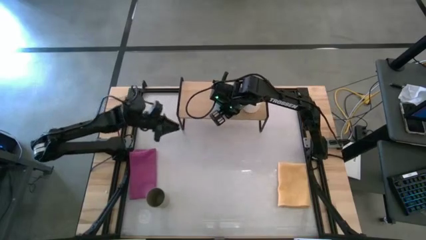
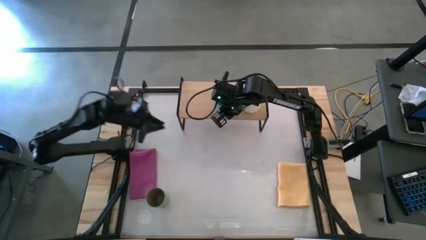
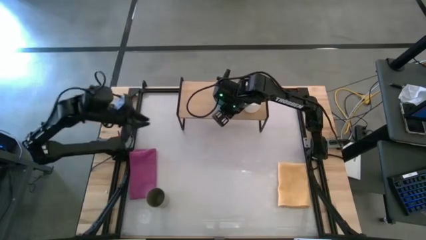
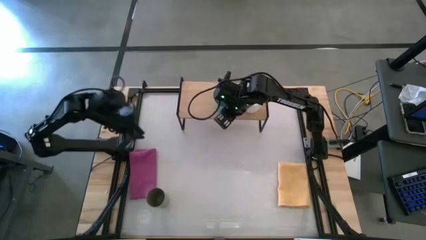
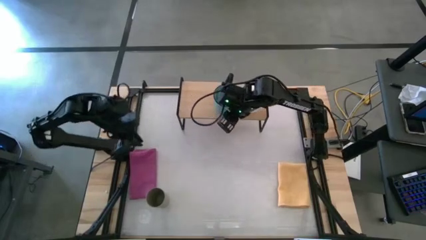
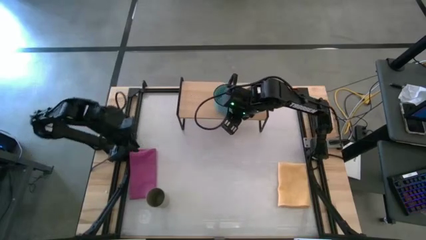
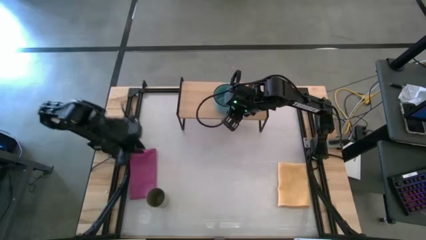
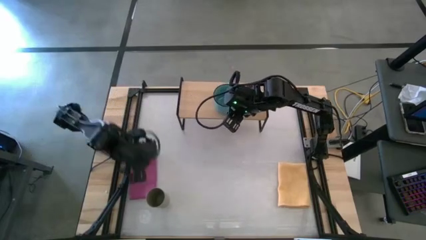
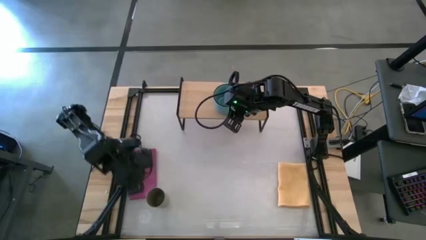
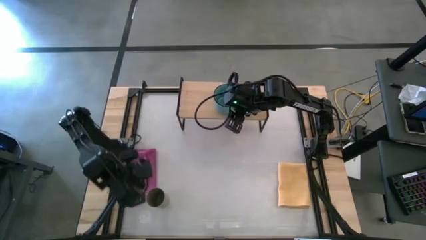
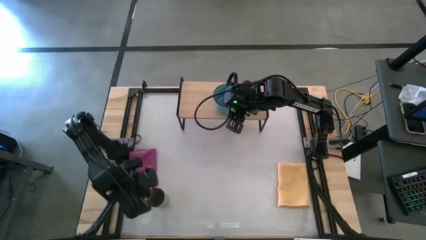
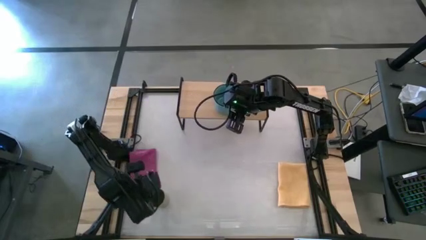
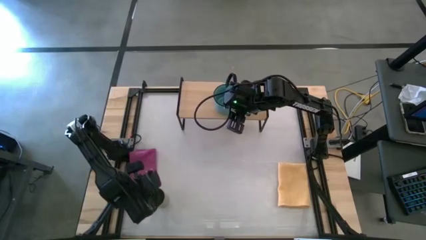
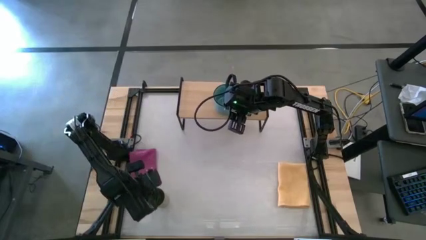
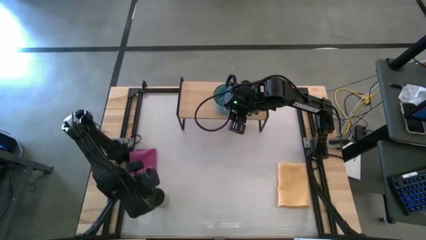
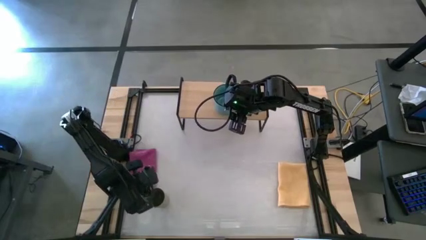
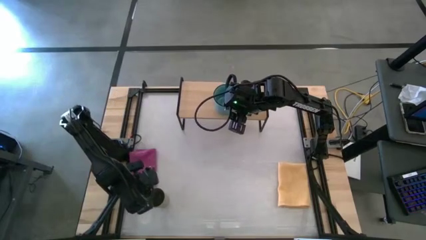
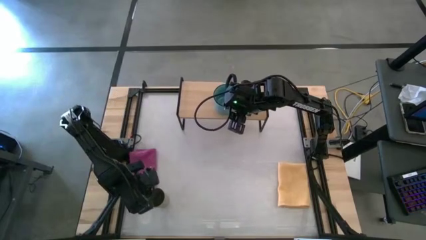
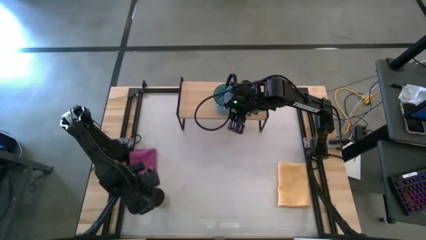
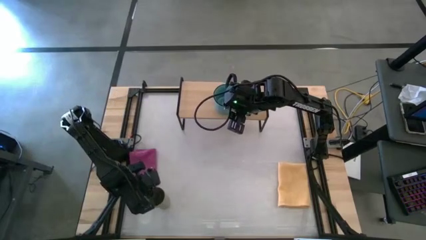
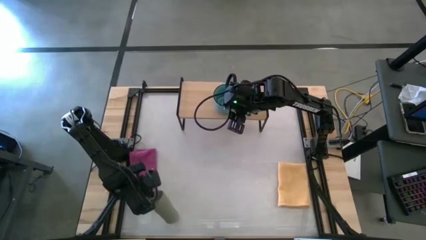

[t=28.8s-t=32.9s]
Task: Stack small to large cups/mugs on shelf
Put the gray cup on the shelf

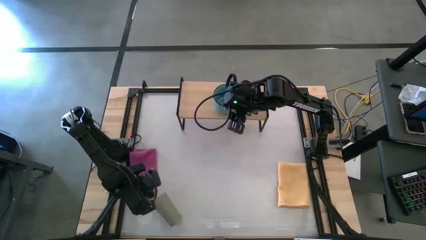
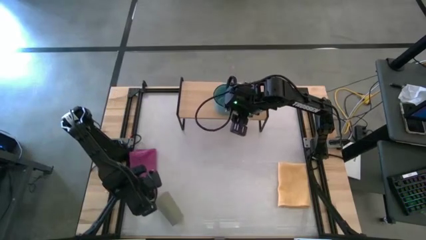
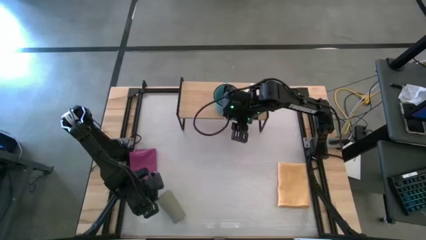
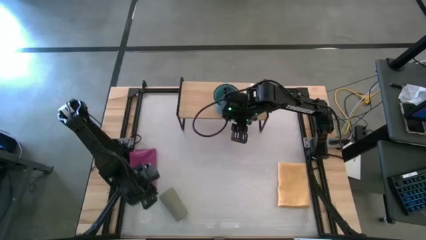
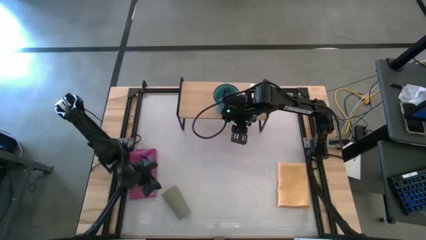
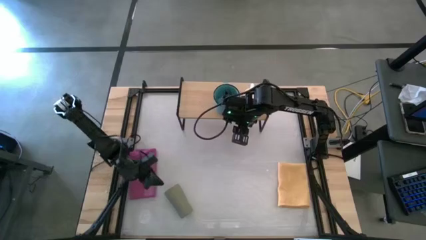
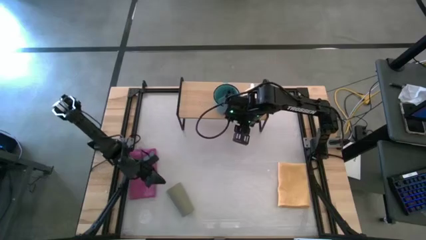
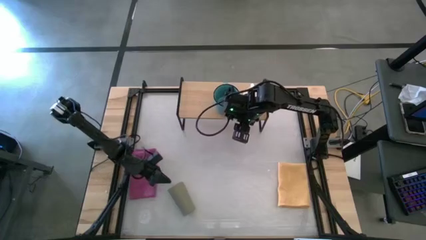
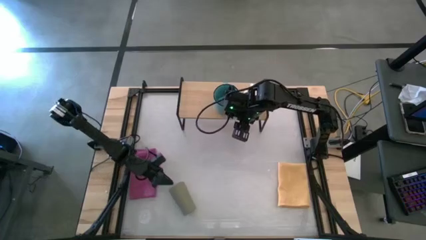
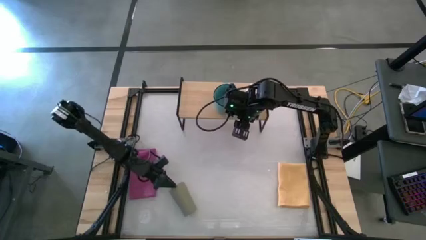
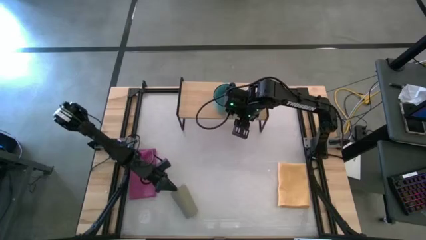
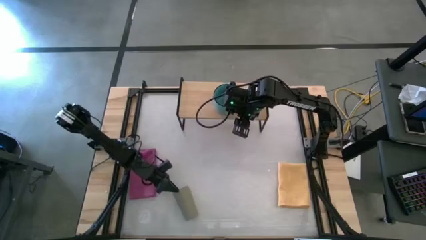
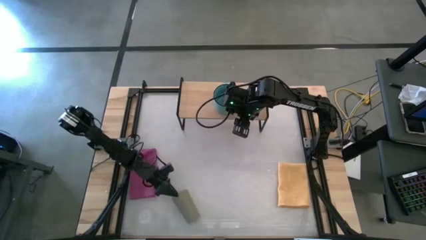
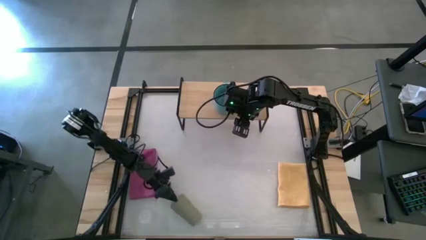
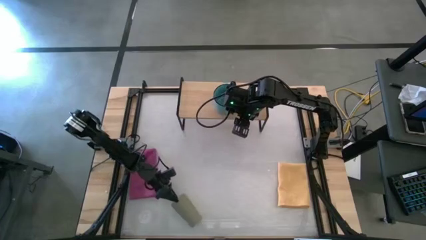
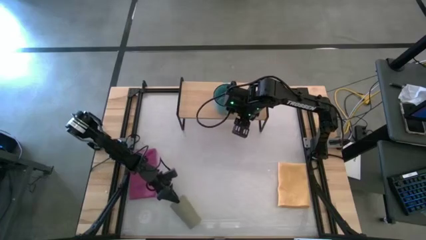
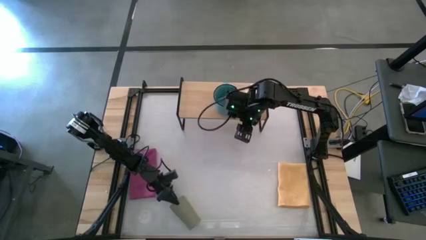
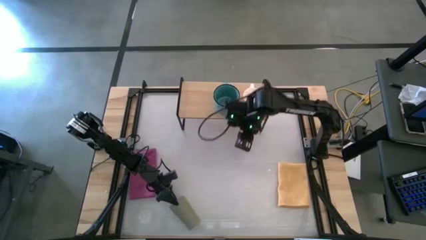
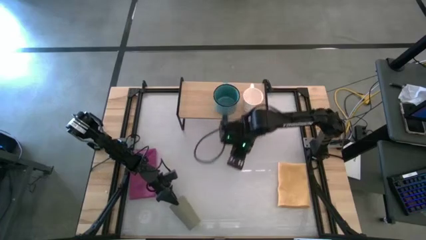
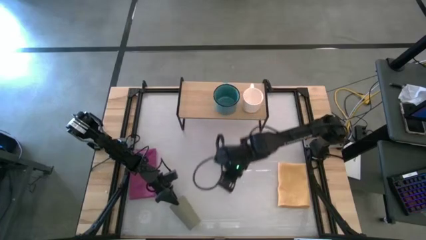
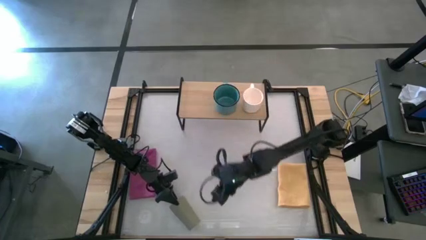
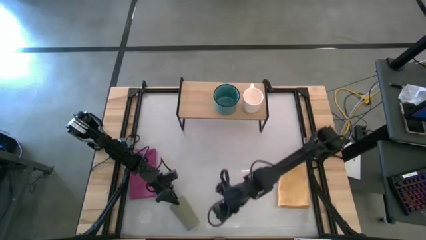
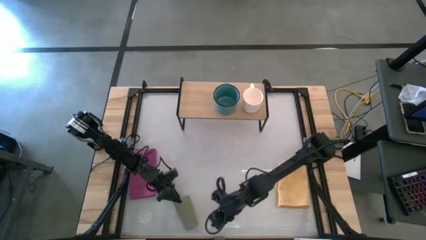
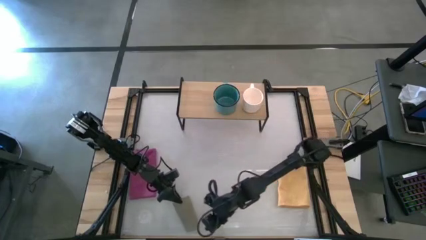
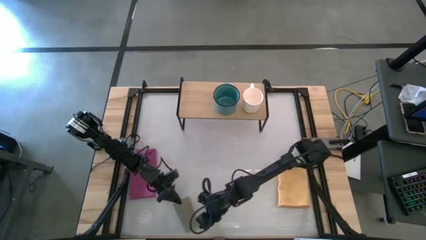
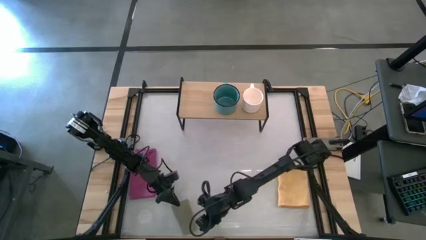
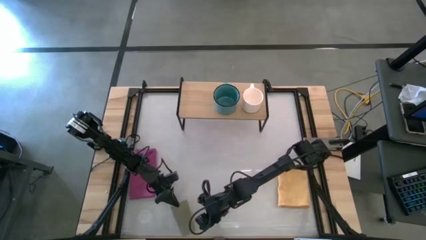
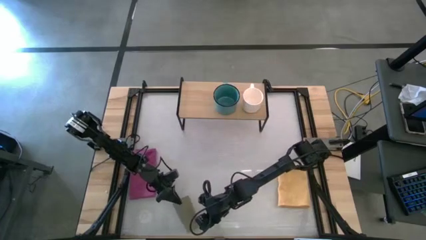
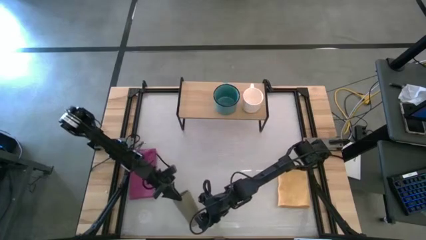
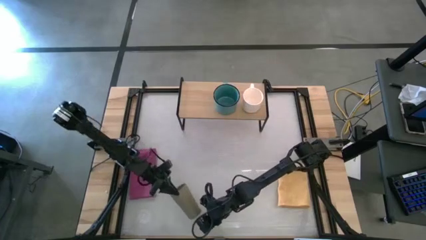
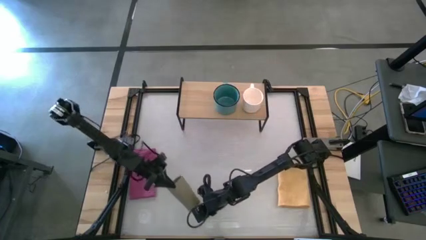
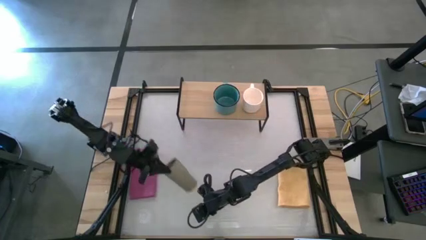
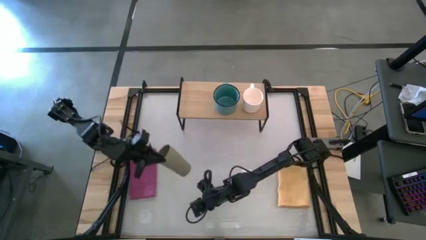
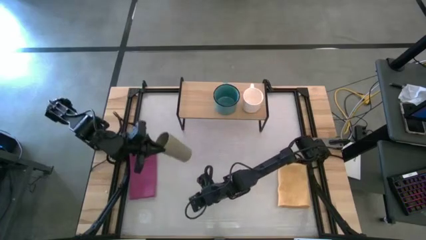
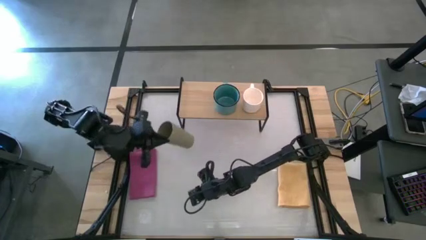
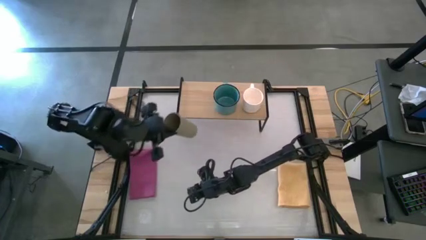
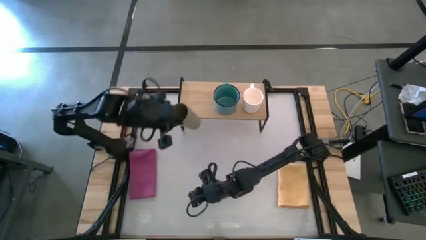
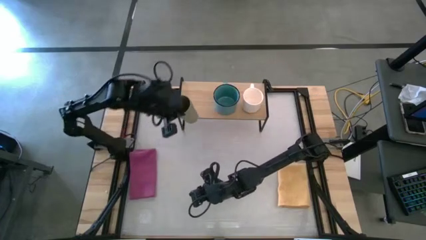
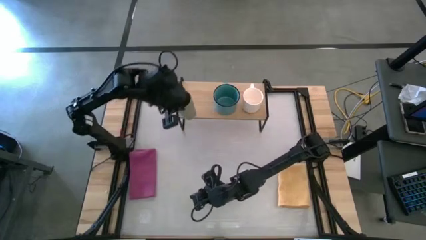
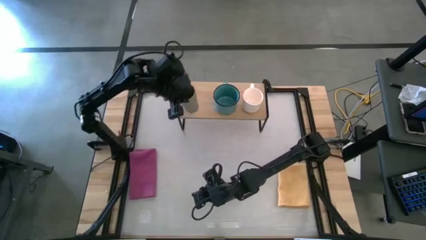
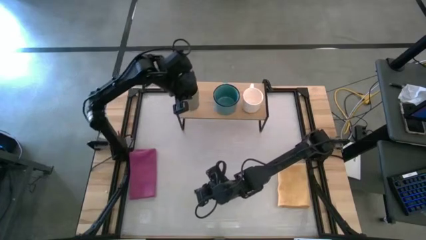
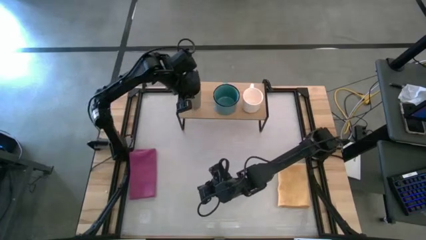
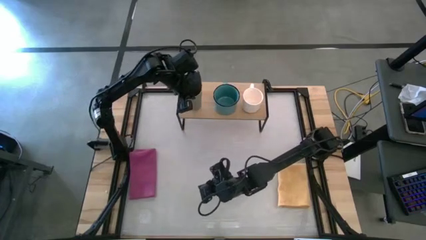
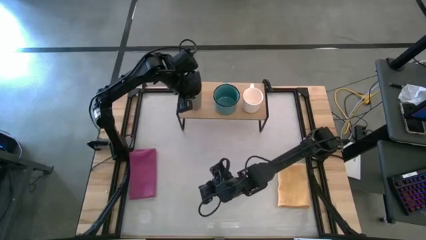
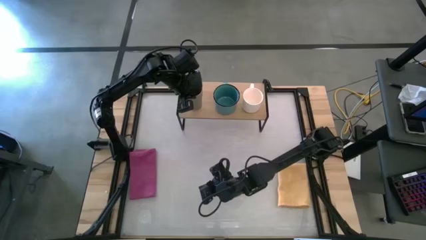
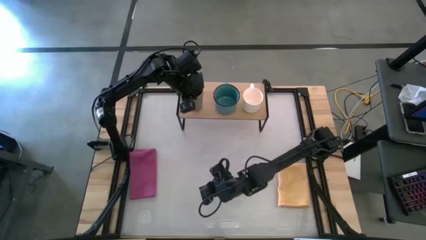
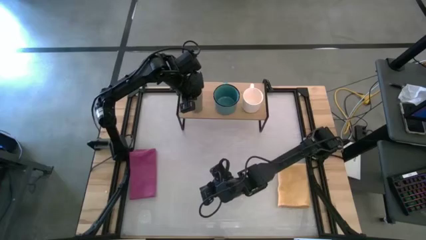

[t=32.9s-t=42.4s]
Put the gray cup on the shelf

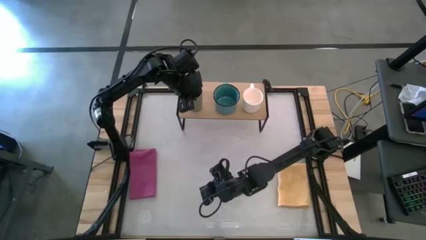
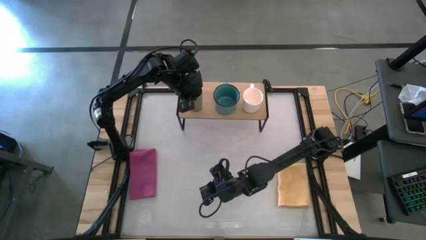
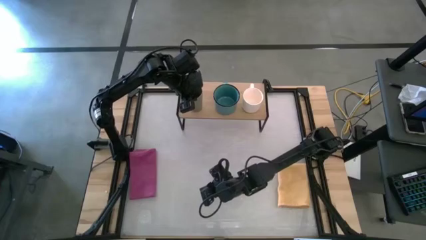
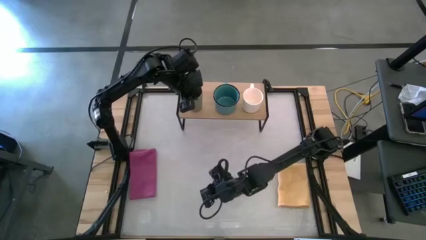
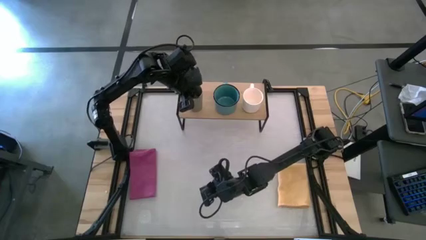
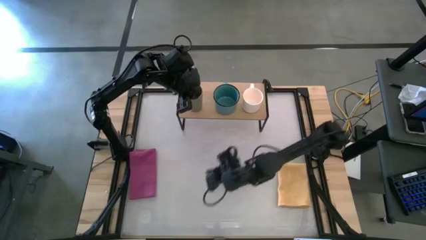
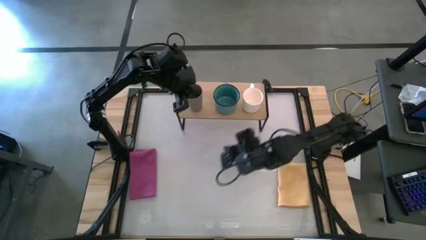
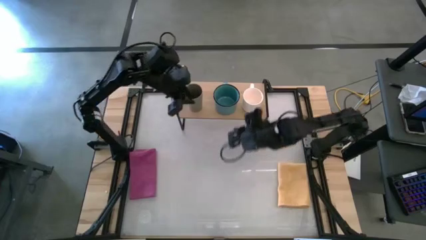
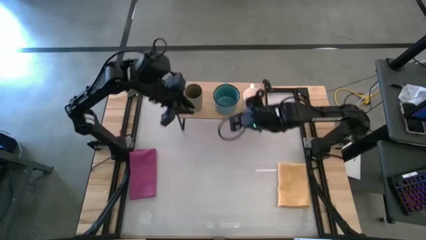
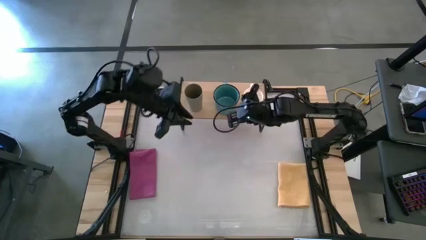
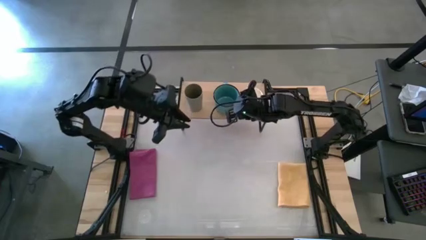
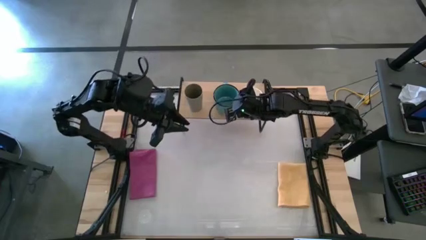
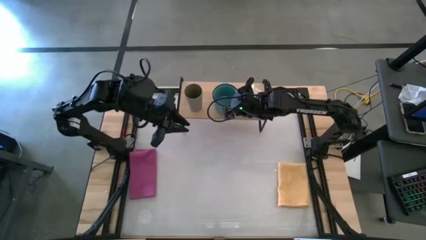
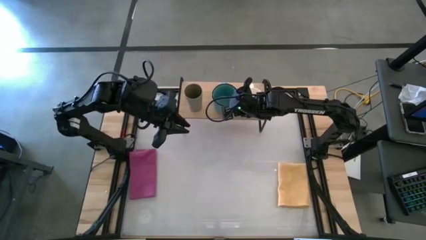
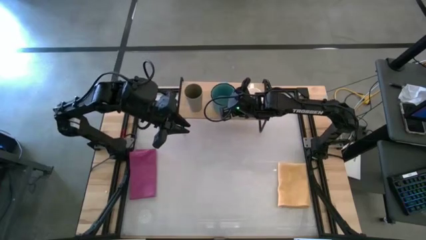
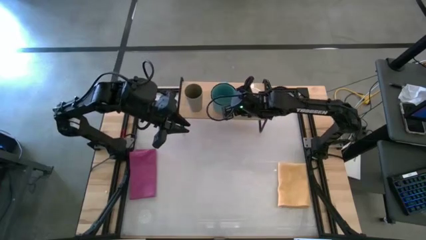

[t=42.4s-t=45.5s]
Adjust the blue mug on the shelf
